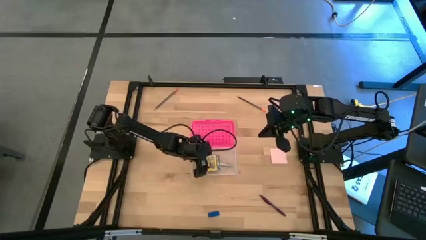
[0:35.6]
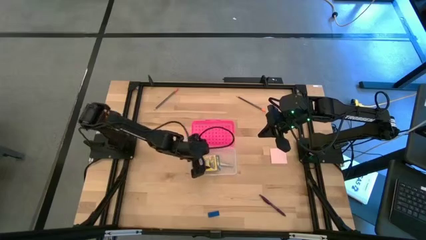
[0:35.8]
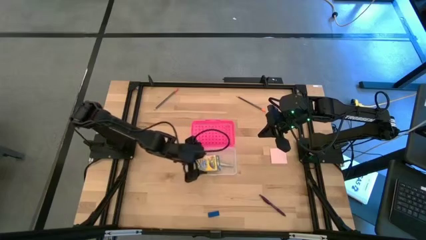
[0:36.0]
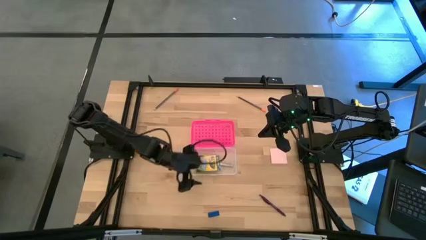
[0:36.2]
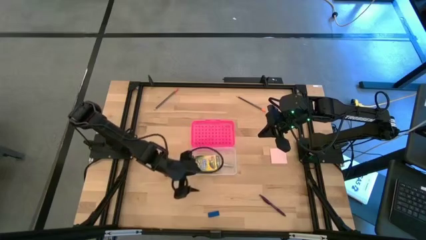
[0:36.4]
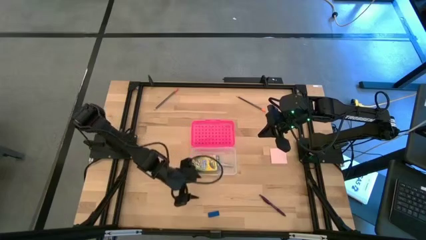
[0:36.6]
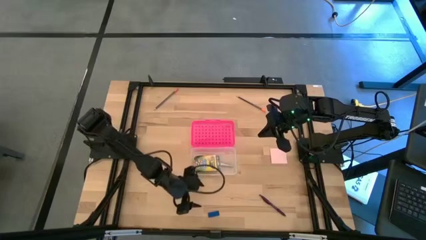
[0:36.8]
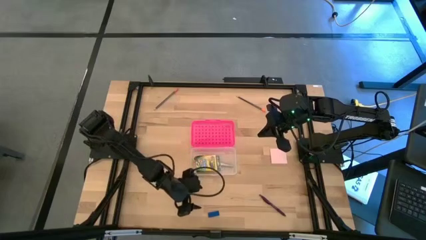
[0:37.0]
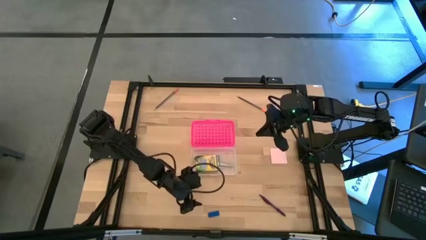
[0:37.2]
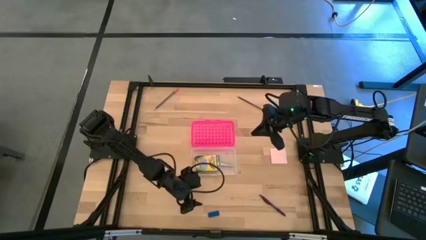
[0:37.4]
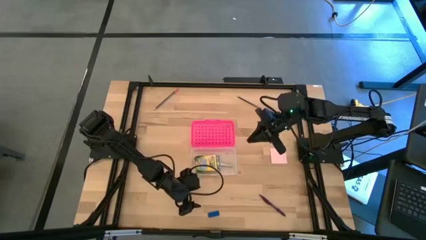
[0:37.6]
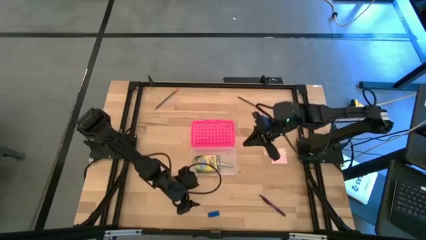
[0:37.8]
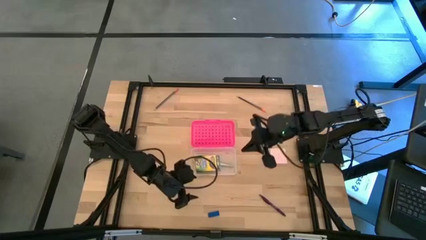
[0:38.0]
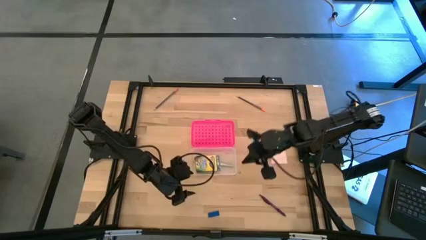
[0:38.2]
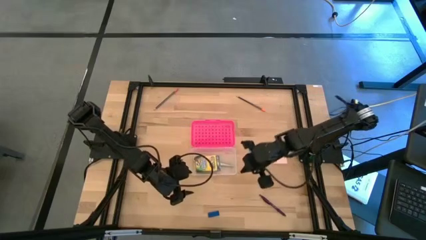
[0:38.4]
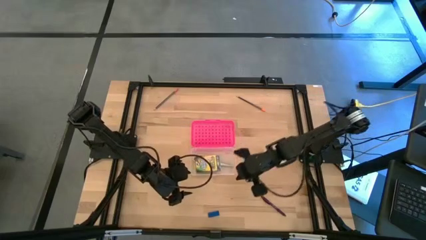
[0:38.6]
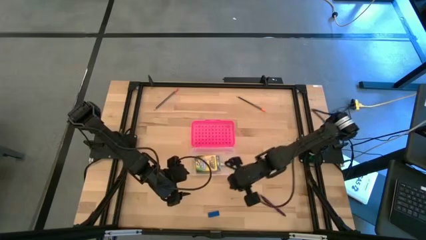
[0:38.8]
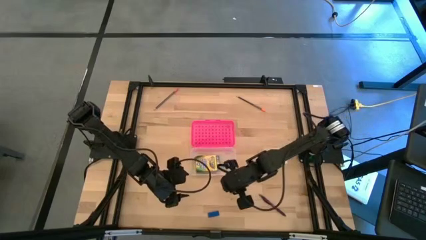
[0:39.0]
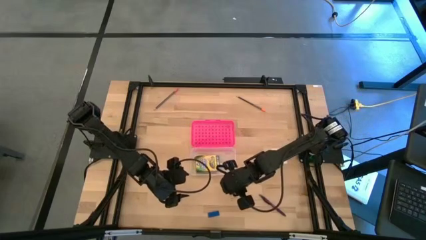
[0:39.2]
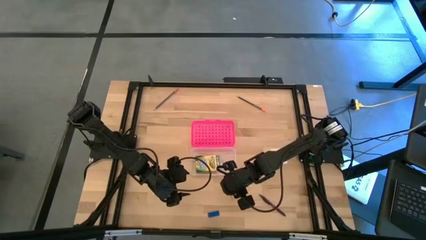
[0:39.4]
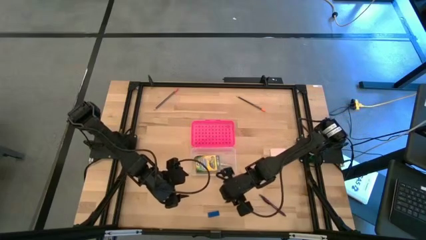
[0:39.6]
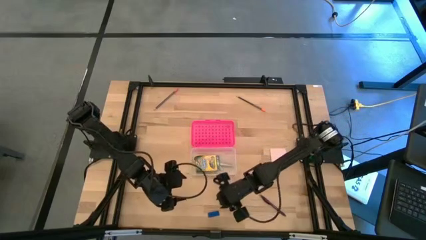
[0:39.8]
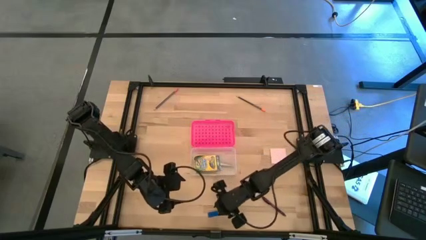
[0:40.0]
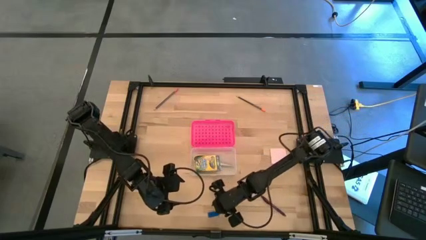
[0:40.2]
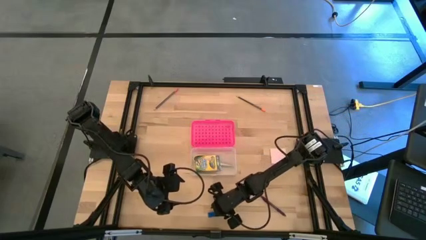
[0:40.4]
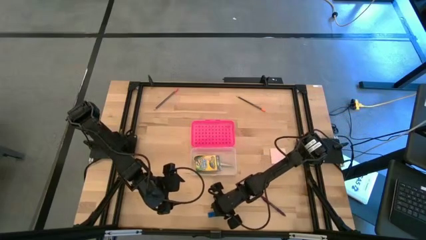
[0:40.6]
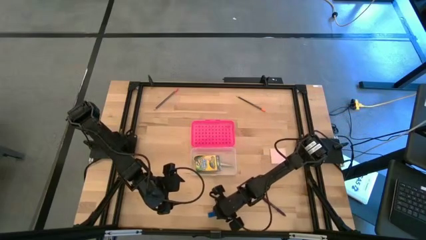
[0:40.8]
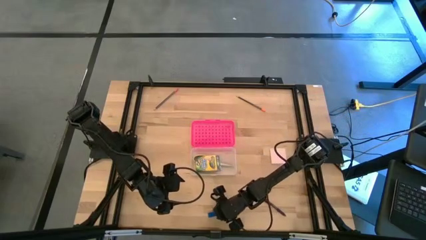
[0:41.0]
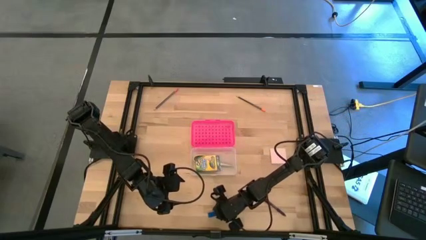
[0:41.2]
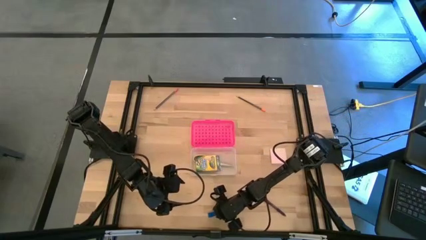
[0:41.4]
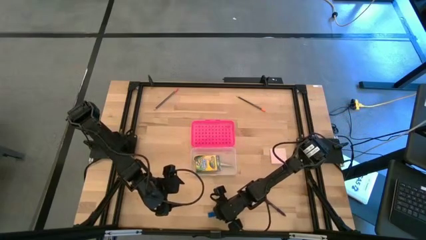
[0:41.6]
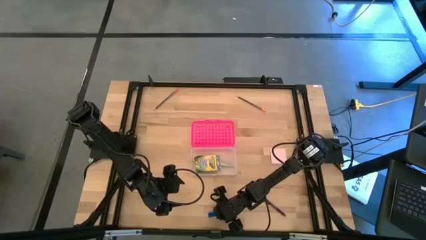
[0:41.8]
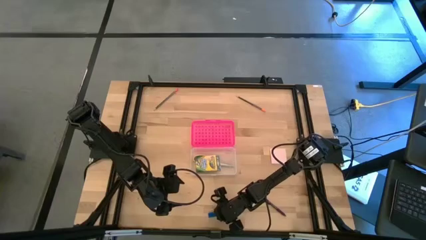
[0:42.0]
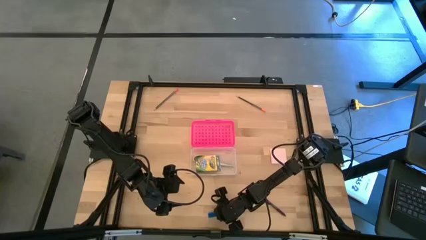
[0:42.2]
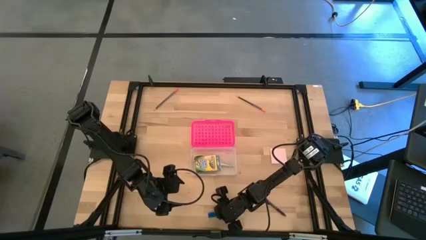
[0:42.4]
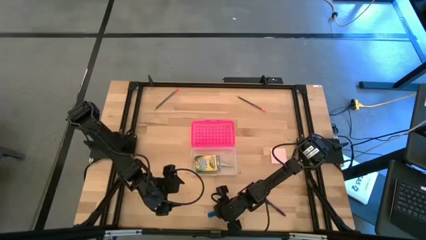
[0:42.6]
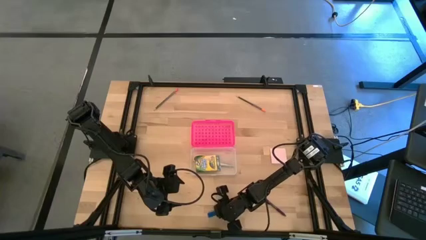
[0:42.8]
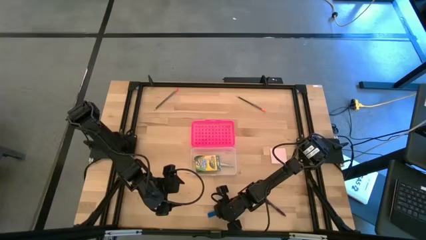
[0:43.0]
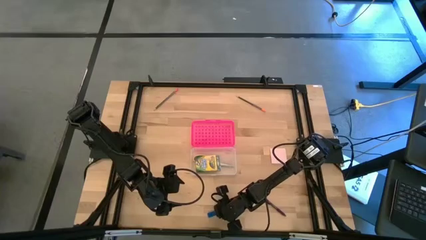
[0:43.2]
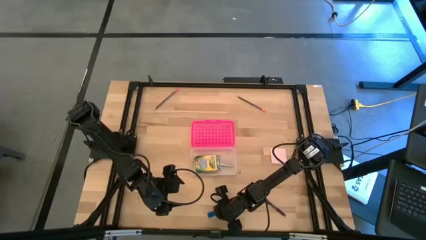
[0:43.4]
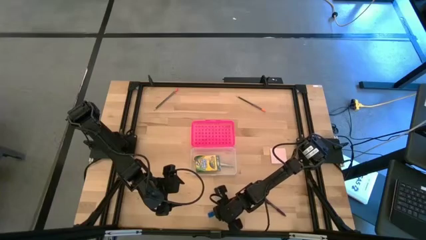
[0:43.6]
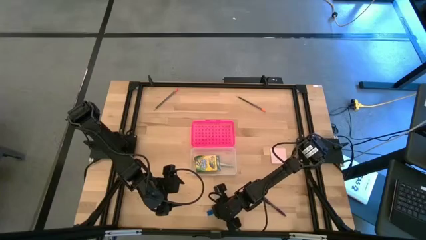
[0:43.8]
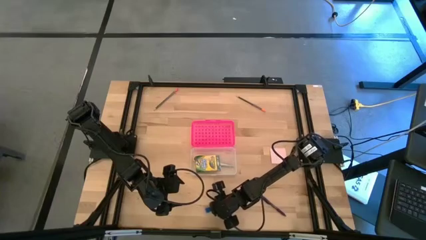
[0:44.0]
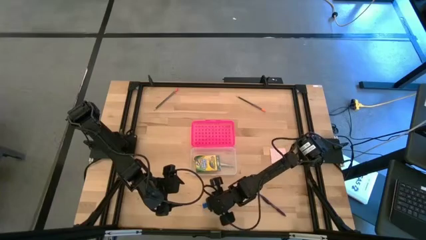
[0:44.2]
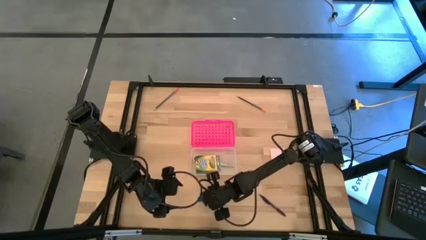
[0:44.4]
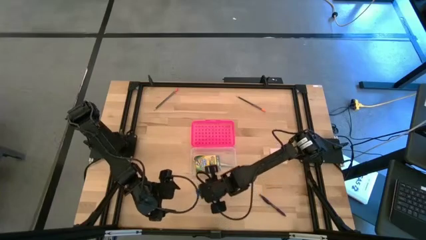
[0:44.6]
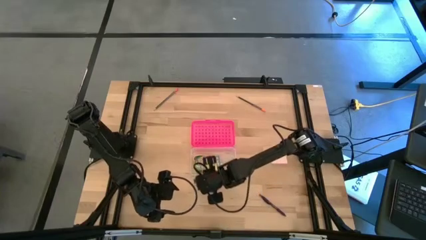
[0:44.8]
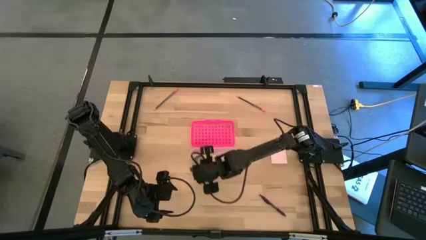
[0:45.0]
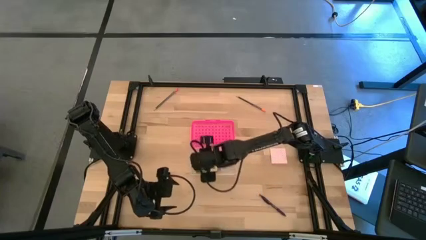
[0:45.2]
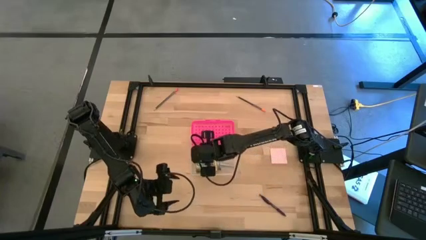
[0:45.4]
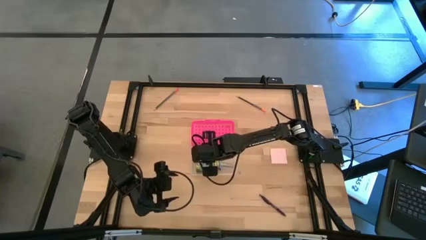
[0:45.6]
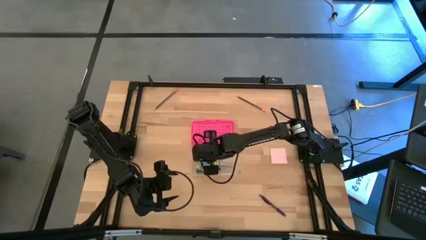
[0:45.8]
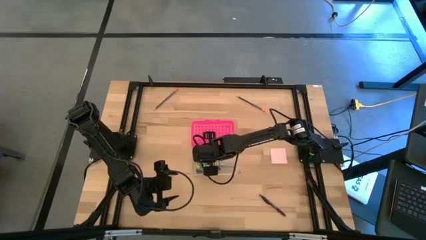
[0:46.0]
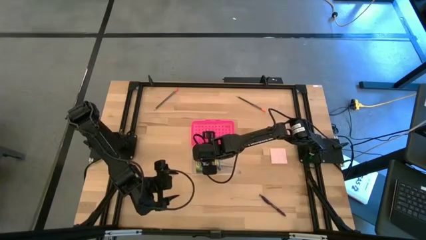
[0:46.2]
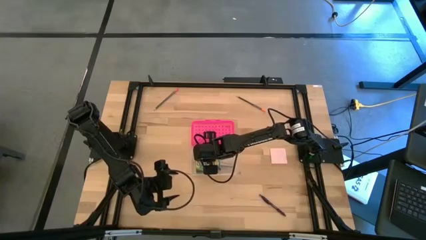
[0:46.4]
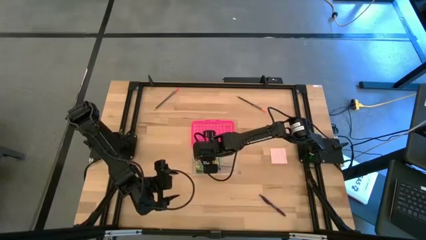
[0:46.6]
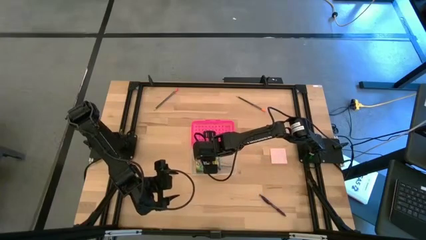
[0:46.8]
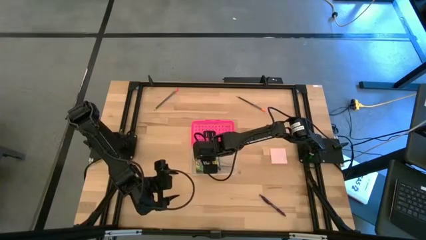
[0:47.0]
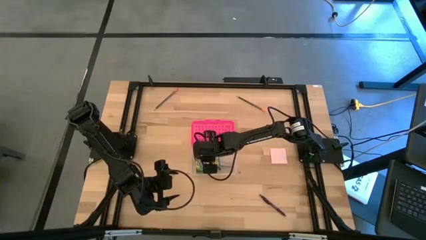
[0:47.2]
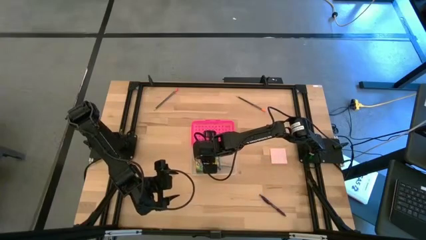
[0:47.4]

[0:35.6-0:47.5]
Task: Pack school essentials
Put the blue eraser into the pencil case
